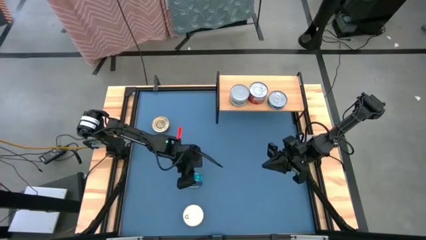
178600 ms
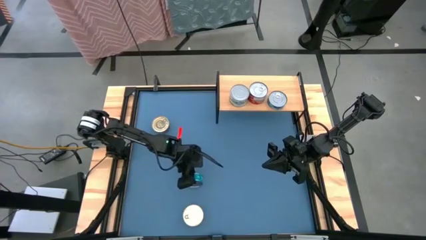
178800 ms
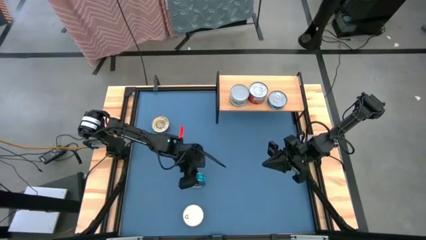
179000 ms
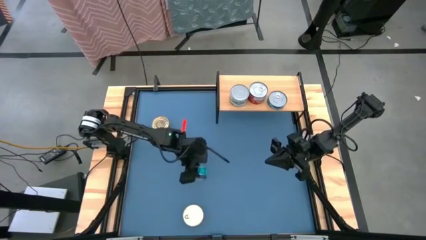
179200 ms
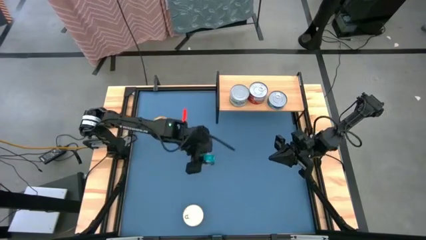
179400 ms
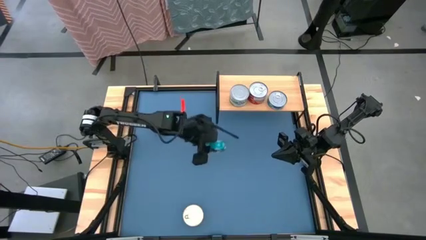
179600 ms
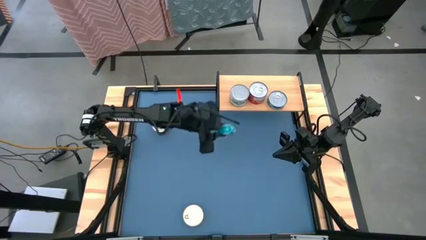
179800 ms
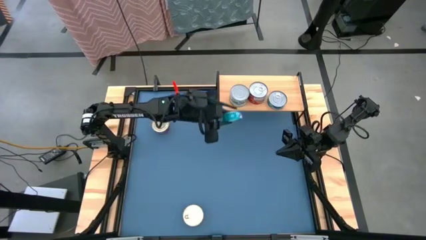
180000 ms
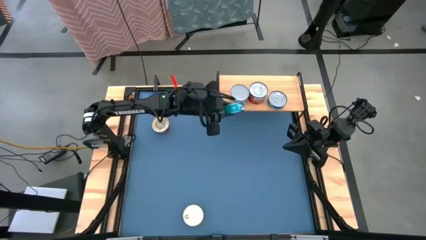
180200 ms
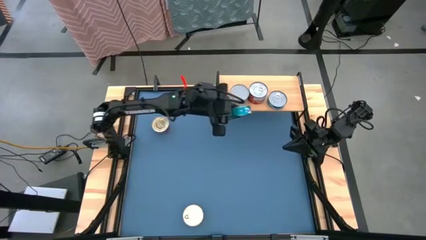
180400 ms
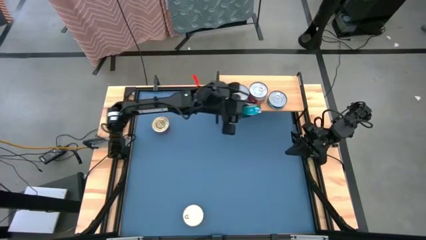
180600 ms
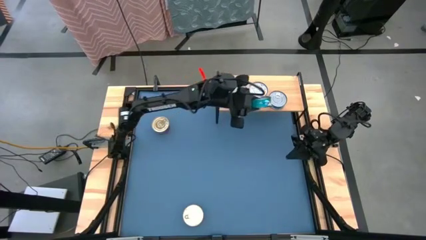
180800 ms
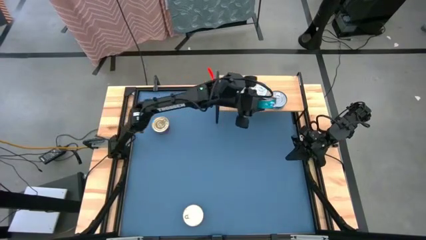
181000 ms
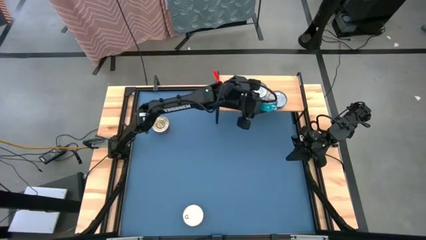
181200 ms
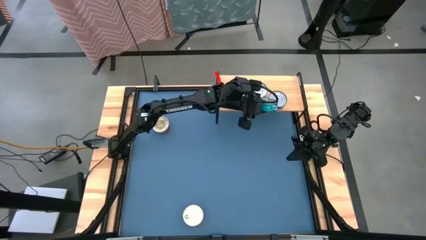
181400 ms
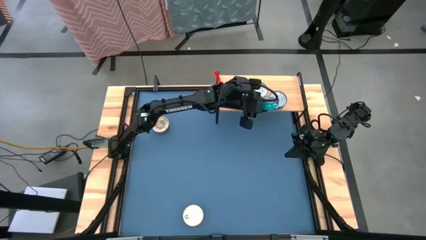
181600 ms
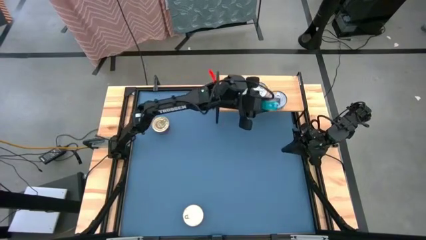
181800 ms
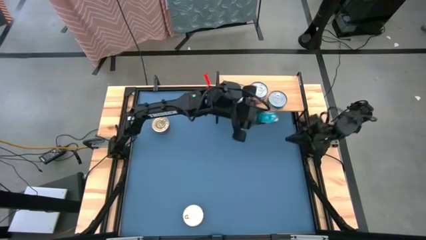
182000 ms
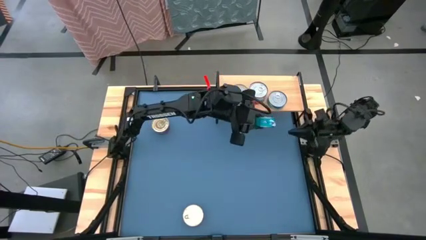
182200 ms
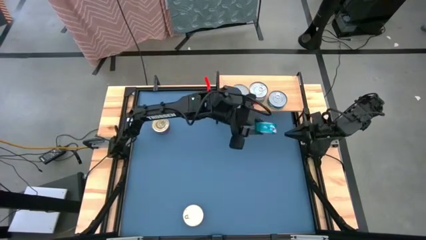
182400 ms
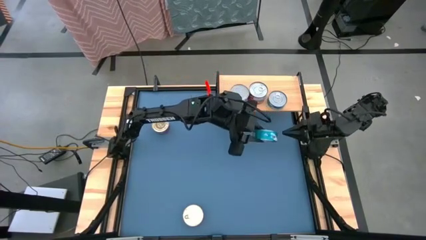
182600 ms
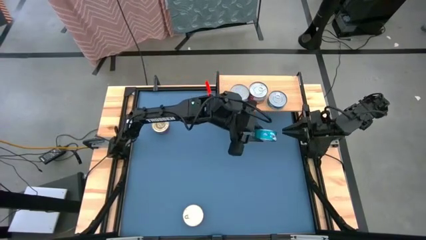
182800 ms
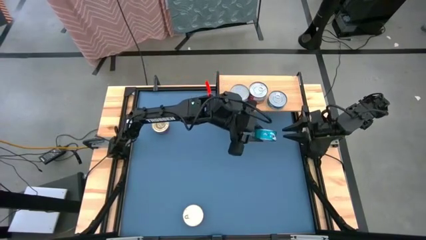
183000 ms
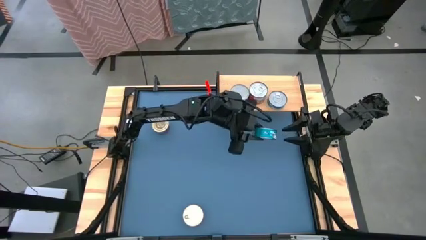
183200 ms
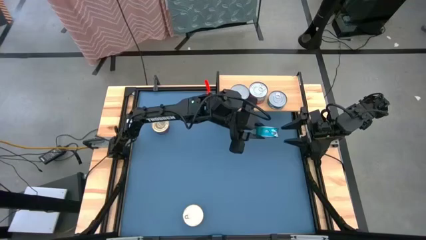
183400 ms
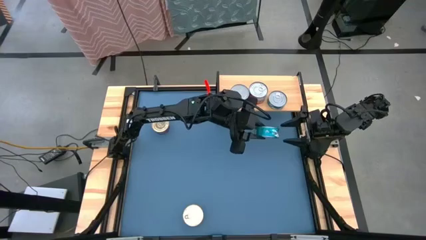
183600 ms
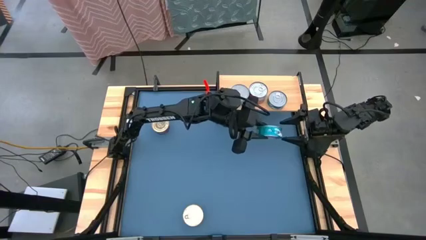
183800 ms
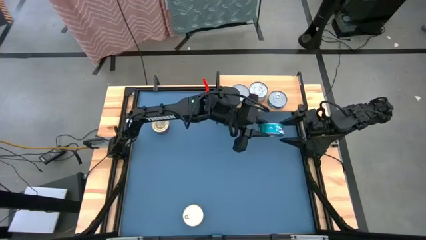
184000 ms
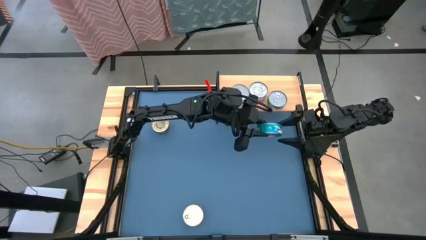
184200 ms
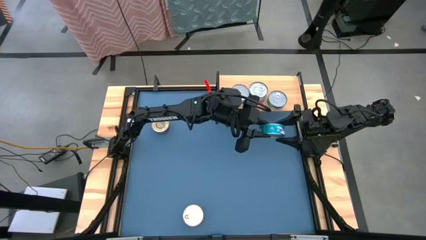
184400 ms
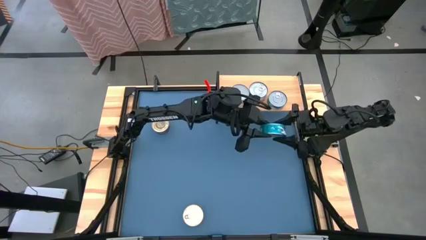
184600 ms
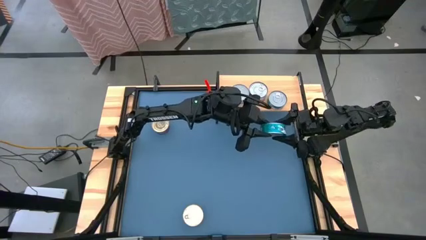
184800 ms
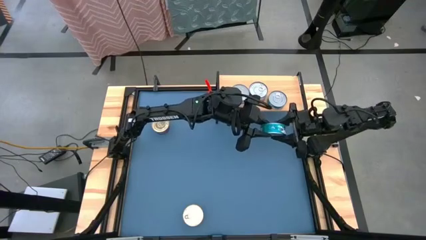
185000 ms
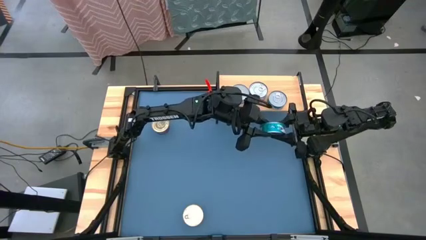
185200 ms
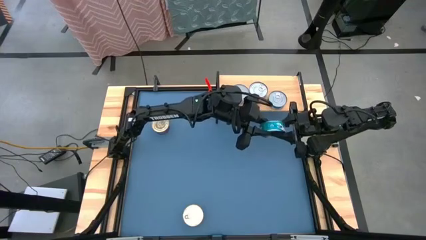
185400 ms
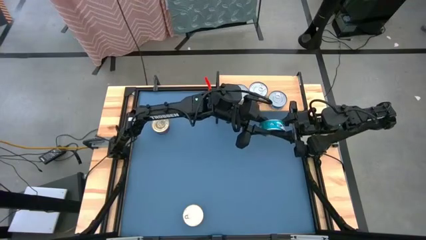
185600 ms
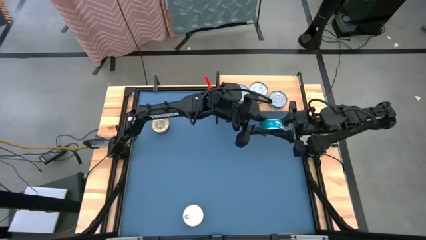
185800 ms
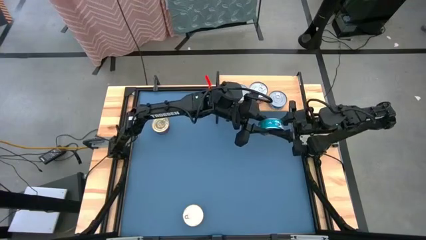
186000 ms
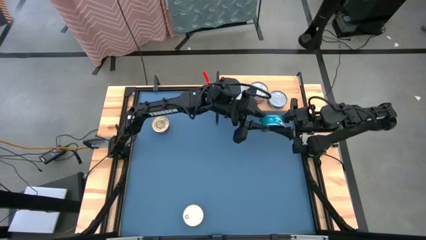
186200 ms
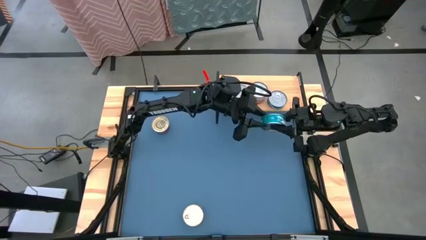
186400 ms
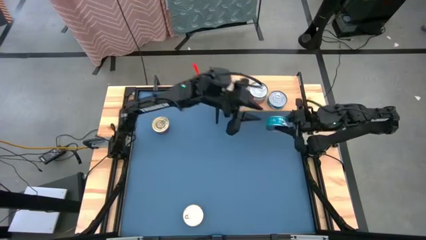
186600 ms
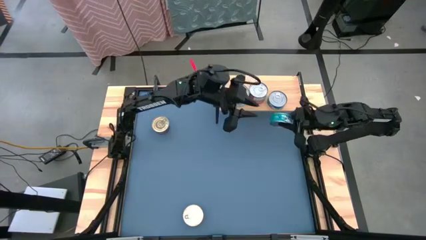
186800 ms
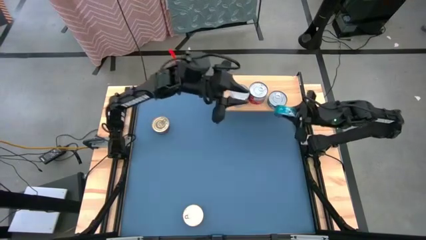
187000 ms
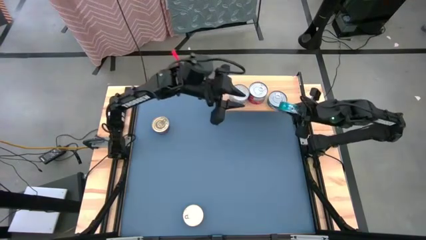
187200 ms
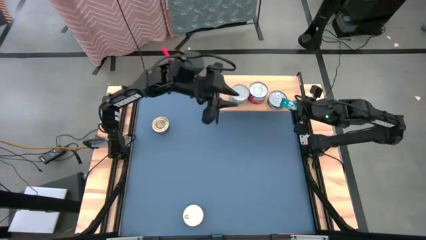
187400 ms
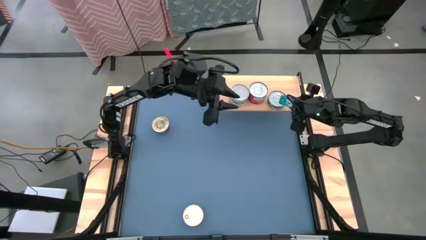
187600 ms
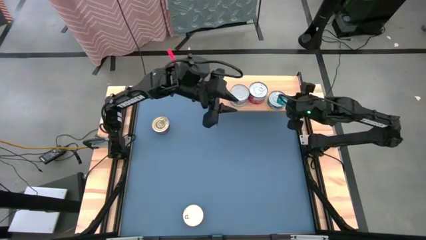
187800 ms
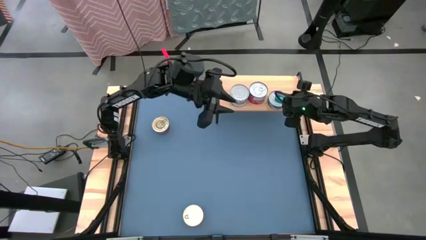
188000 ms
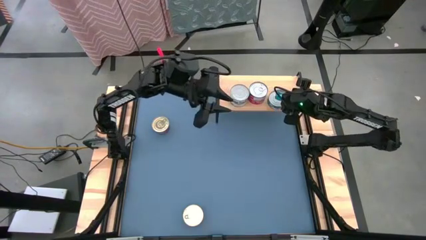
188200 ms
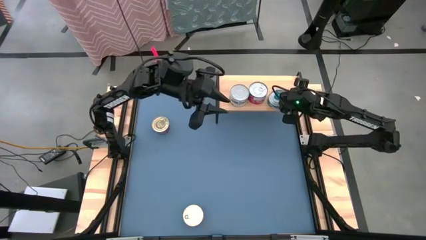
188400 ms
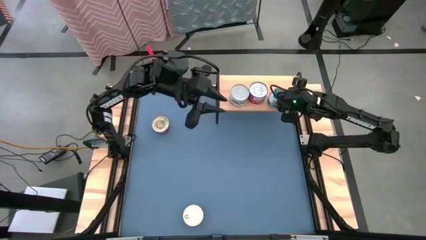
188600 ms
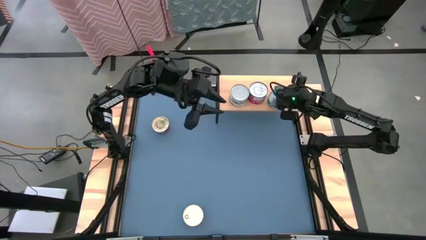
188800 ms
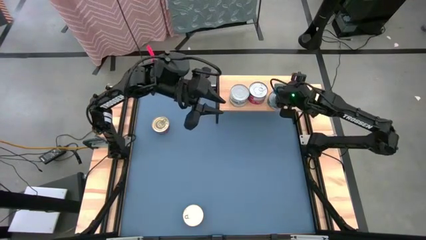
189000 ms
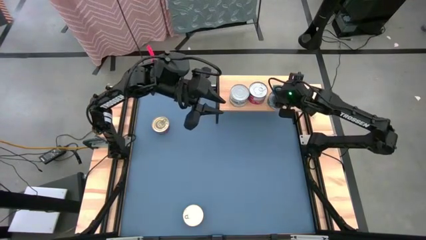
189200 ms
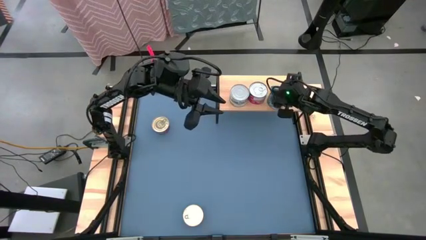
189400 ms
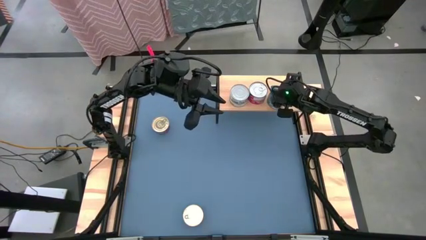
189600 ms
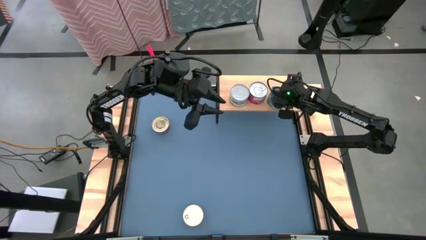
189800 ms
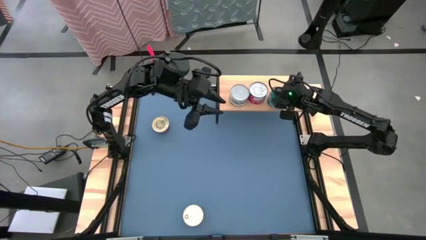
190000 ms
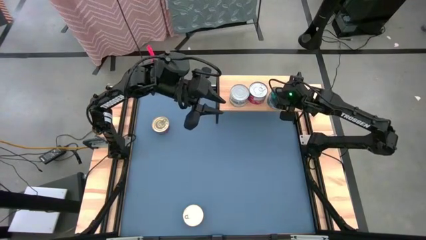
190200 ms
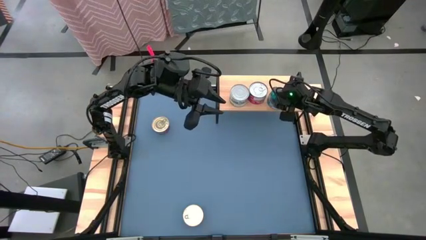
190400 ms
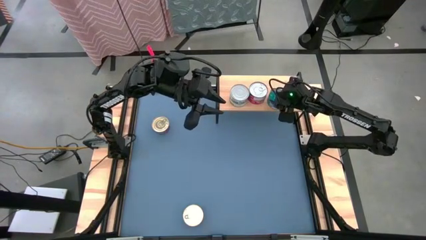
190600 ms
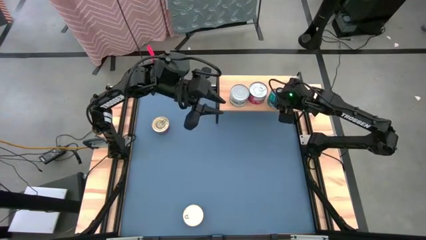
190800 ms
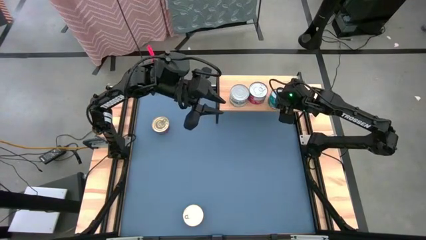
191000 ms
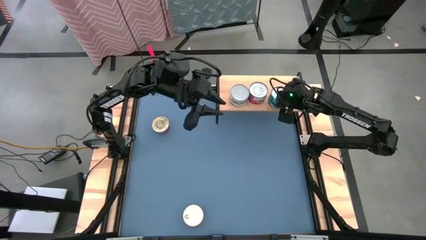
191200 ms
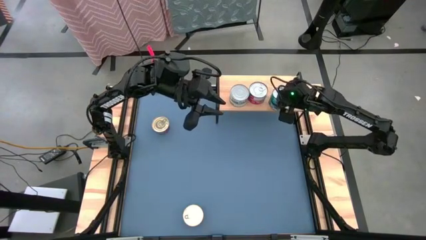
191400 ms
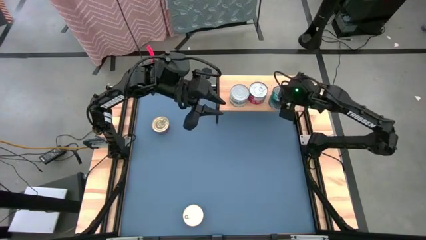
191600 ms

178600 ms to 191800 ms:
Task: Stack canned seafood by type on shelf
Stack the green-blue tuna can on top of the tuna can on the shelf

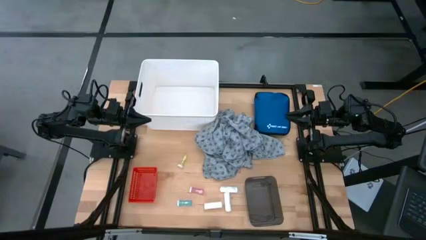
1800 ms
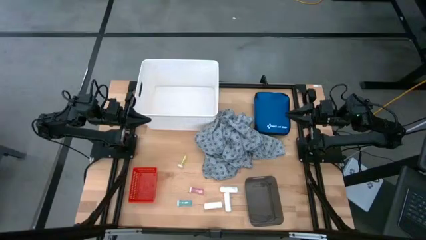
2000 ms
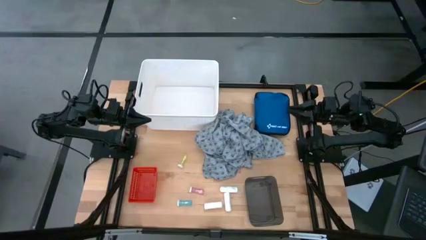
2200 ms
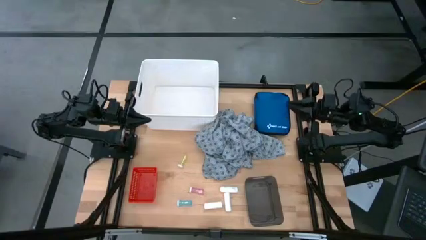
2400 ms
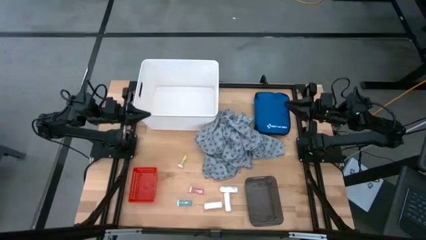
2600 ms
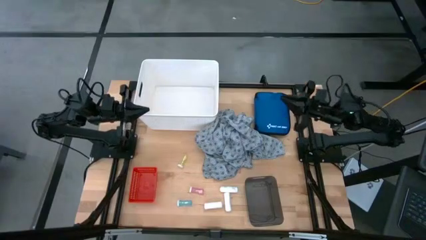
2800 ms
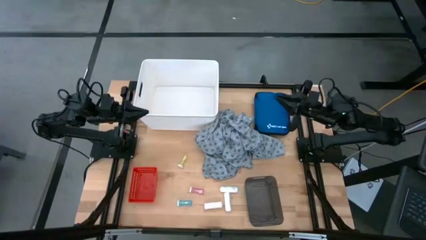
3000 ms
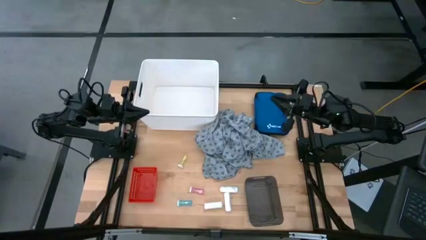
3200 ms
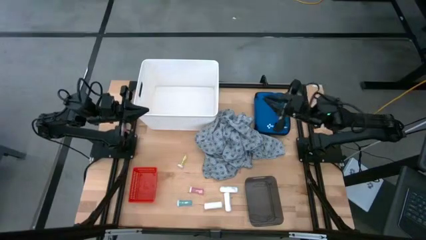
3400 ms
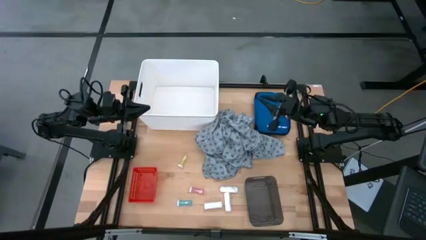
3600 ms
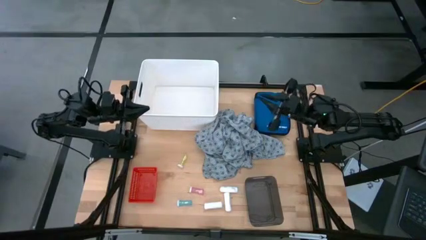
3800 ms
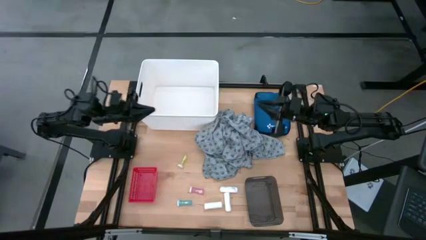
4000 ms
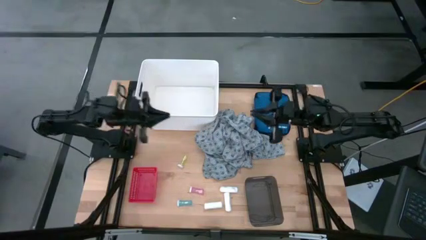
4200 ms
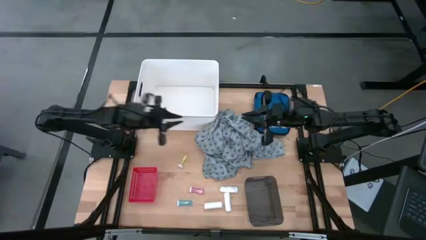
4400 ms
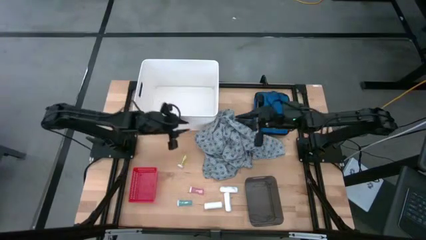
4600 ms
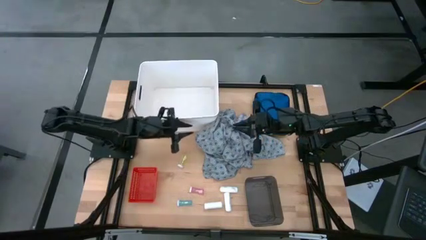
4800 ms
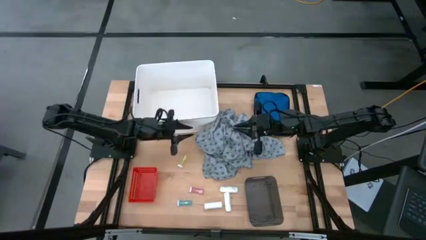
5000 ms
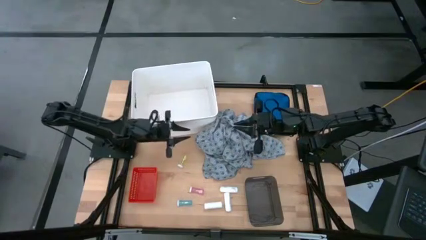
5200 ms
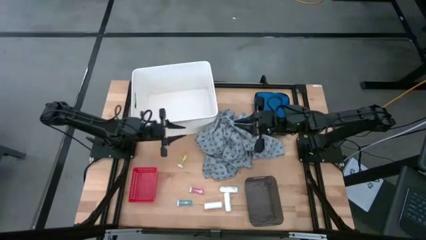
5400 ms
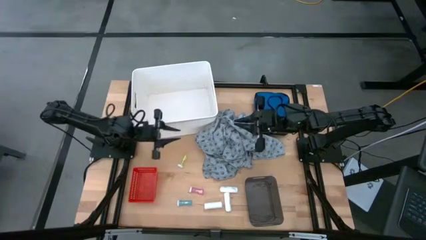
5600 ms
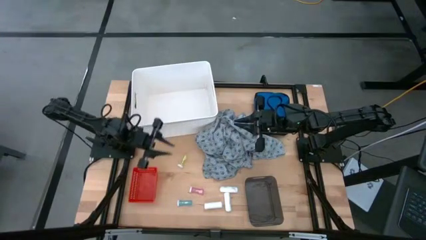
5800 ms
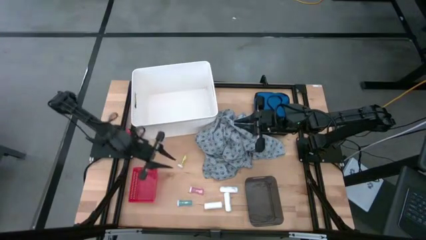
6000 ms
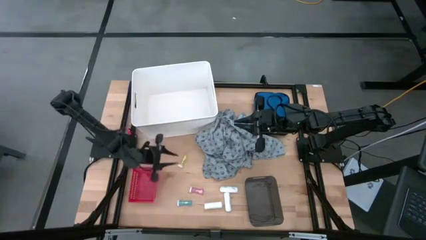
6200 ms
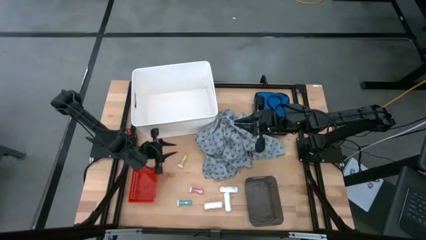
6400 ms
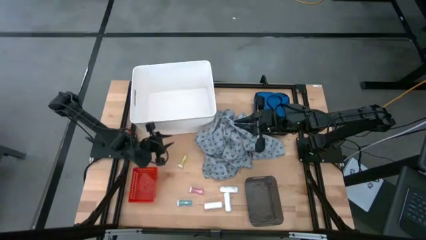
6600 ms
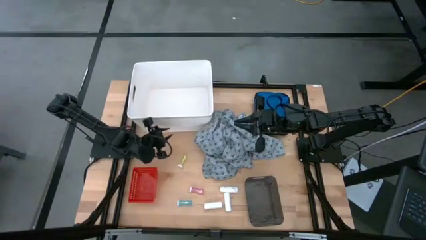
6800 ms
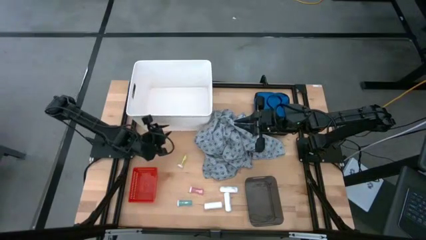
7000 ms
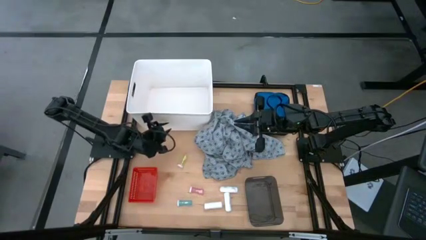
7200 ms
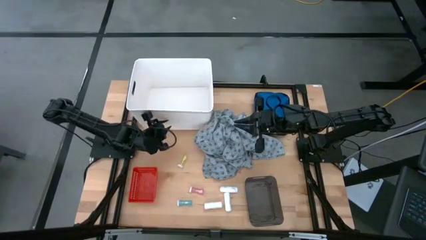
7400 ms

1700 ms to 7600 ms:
Task: Pick & Place Medicine items
Adjust the white bin
